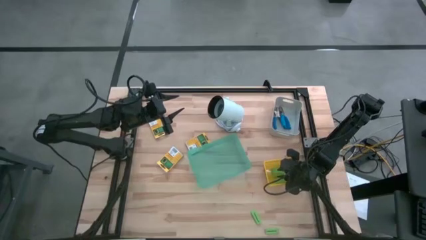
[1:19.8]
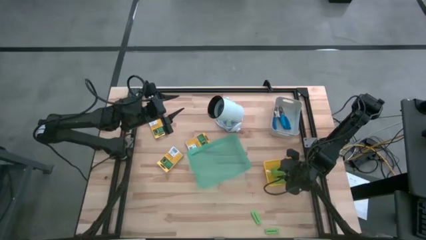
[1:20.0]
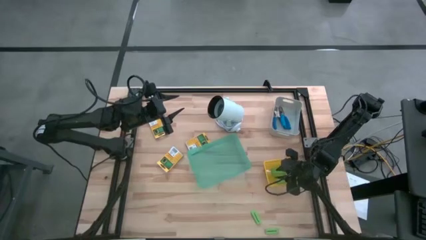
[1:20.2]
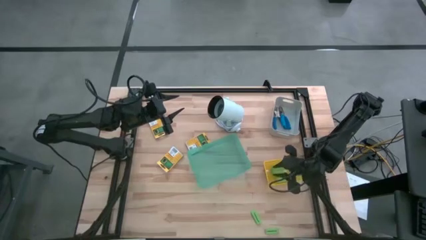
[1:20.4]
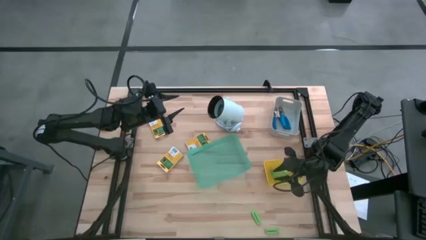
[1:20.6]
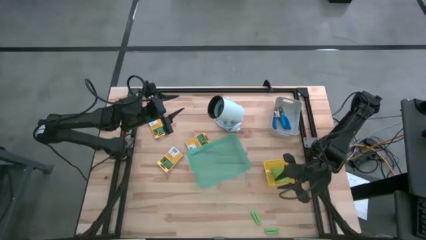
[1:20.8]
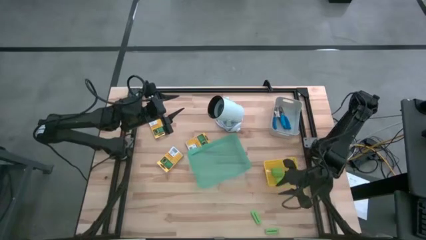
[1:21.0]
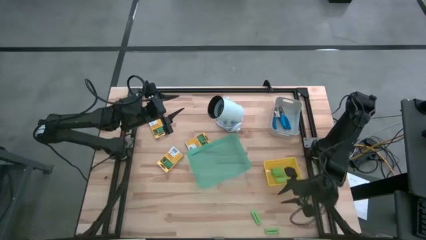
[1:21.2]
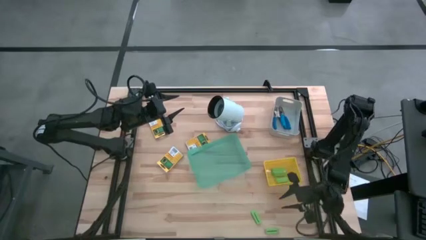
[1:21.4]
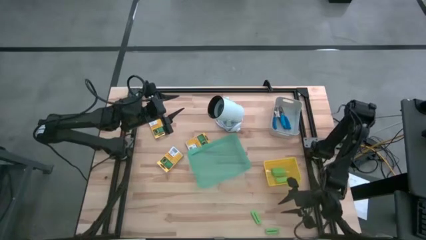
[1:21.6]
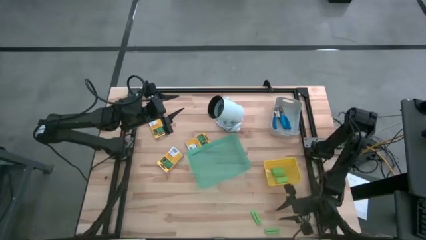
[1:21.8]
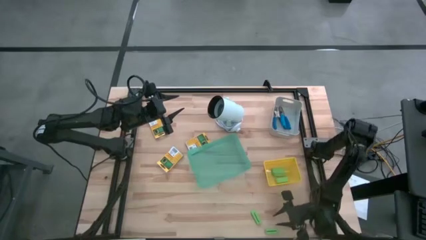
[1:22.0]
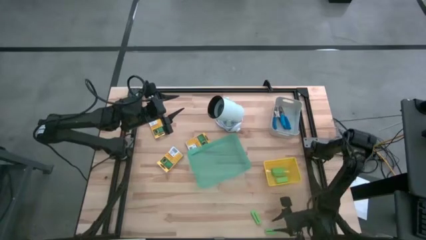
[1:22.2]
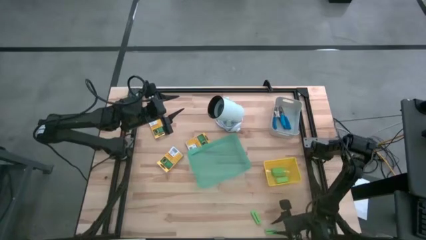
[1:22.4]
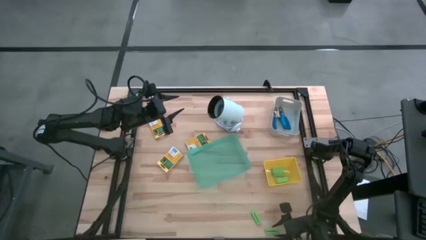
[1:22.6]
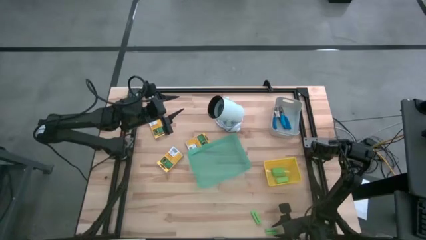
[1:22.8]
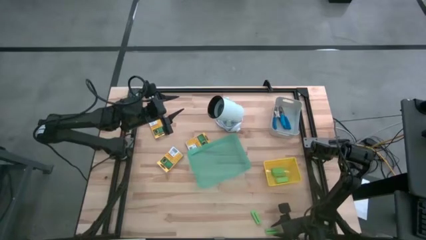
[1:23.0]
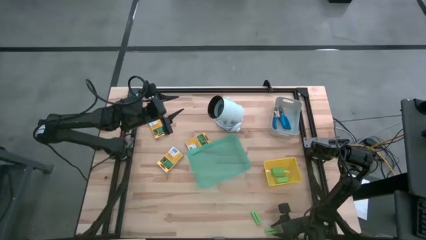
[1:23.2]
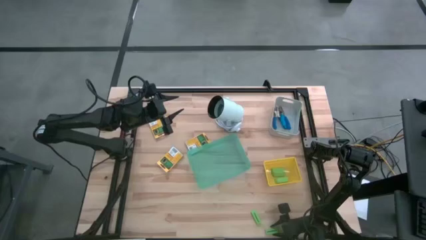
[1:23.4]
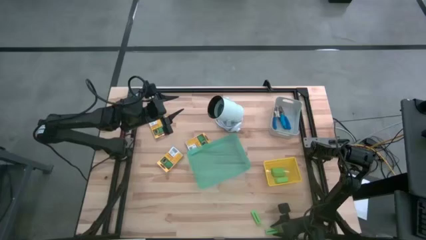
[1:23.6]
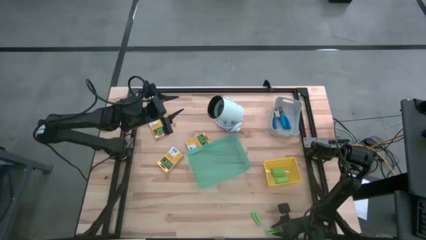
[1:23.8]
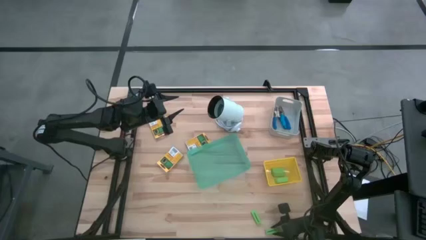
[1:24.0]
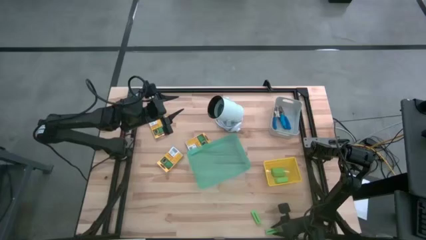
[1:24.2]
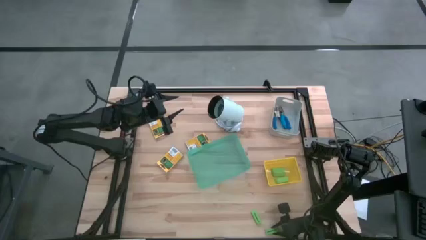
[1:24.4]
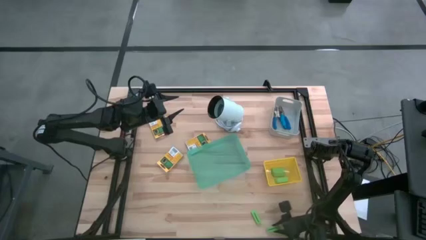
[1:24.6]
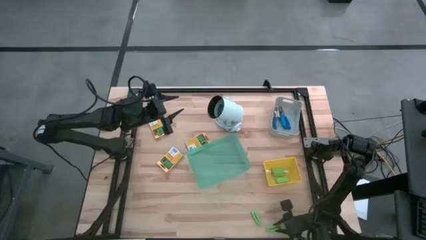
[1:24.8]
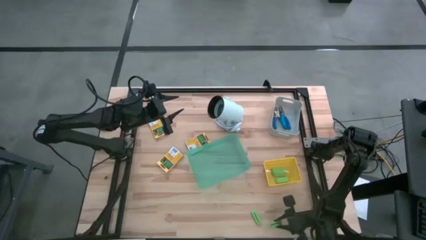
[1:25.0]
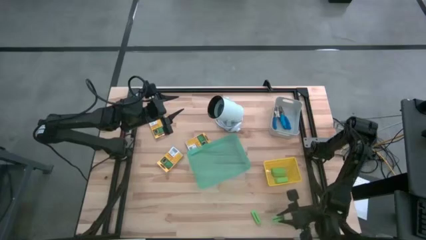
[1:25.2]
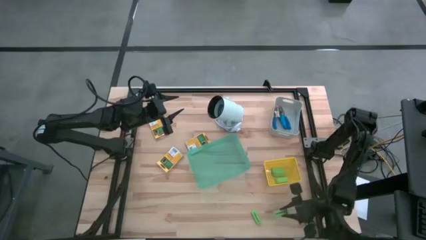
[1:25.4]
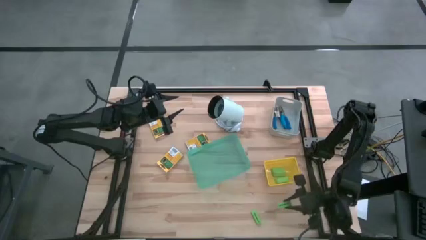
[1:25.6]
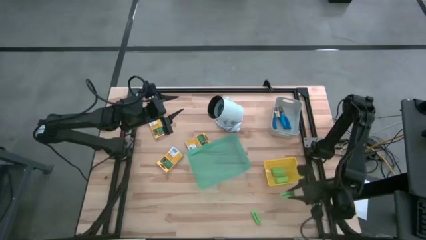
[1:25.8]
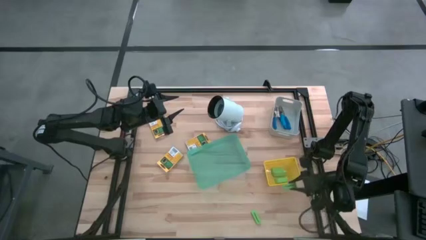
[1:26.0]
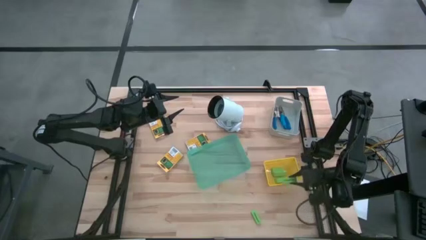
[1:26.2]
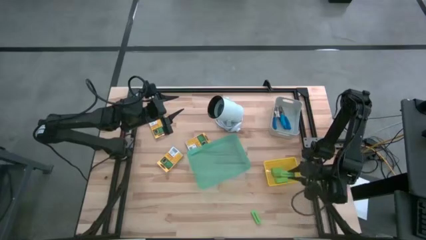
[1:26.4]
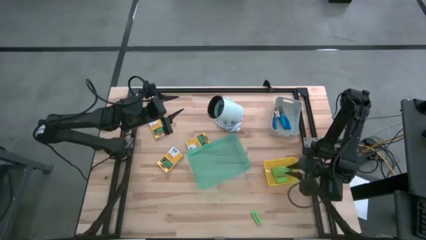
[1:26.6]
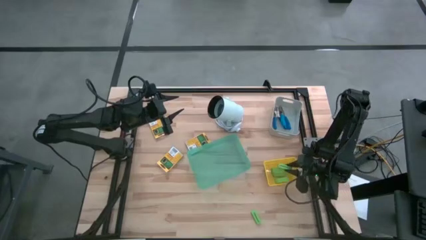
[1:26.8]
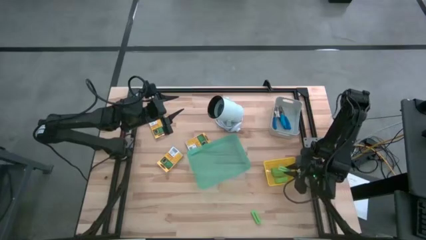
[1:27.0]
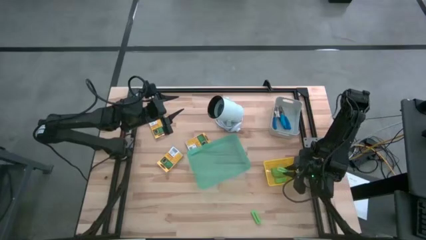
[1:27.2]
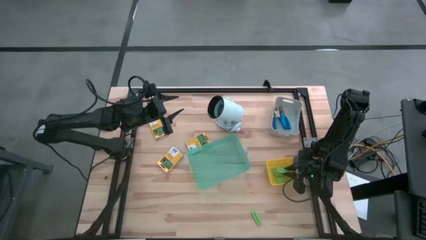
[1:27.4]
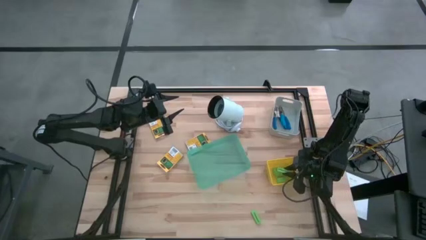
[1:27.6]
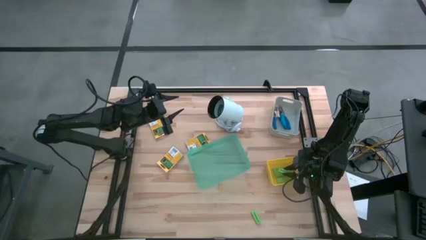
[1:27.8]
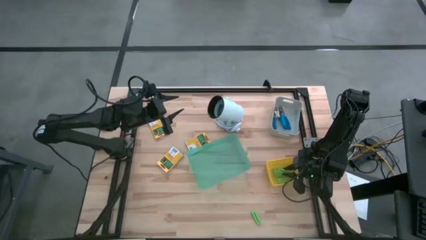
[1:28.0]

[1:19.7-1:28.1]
Task: Pick & Place School Supplies
Put the green eraser into the yellow bin

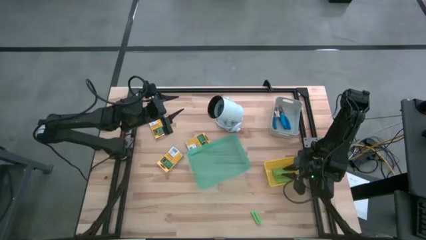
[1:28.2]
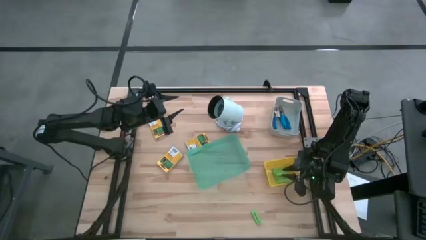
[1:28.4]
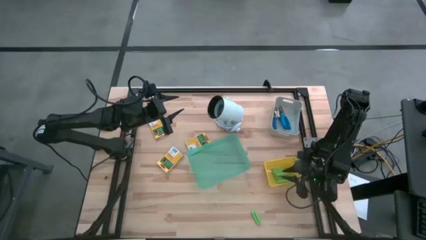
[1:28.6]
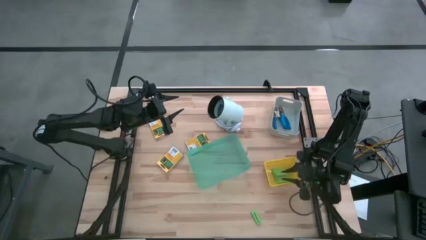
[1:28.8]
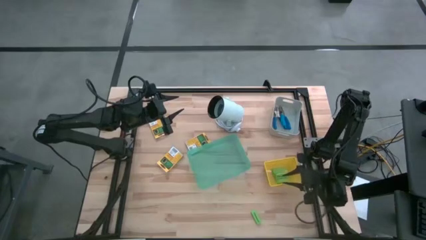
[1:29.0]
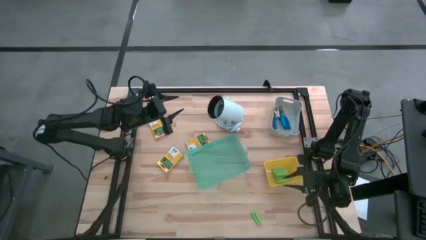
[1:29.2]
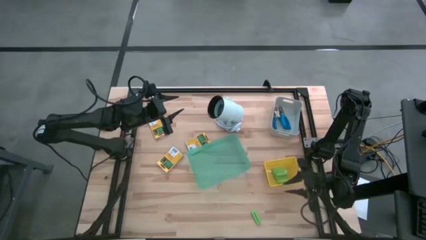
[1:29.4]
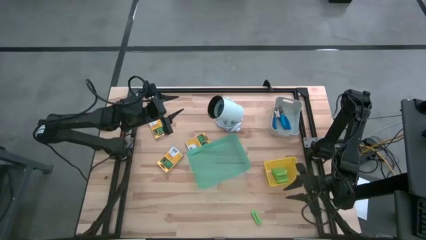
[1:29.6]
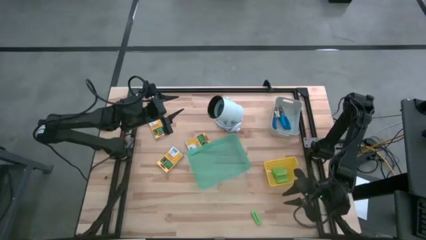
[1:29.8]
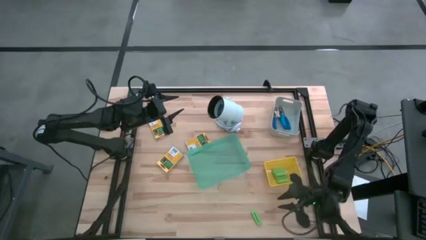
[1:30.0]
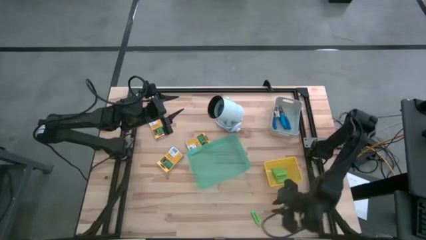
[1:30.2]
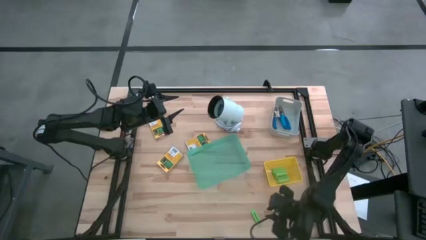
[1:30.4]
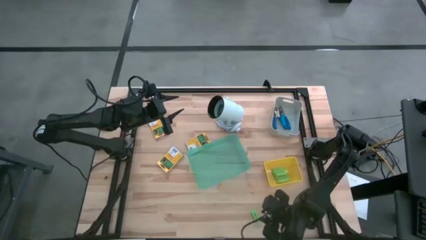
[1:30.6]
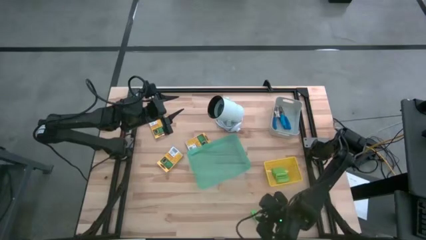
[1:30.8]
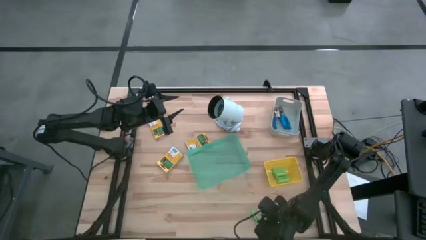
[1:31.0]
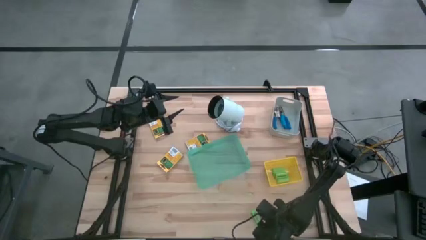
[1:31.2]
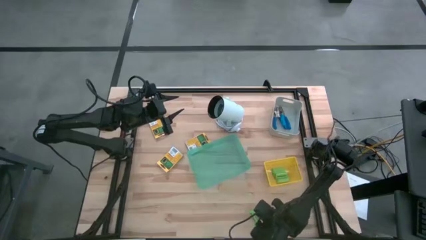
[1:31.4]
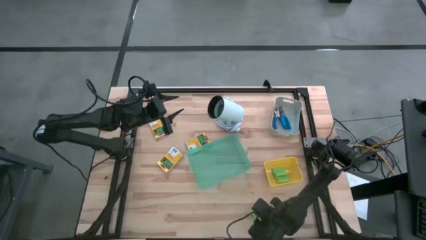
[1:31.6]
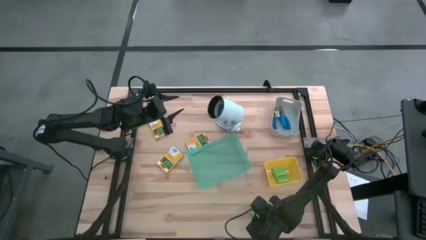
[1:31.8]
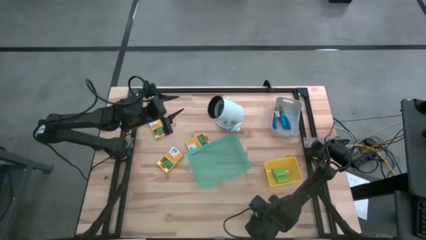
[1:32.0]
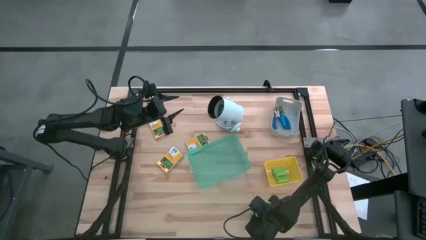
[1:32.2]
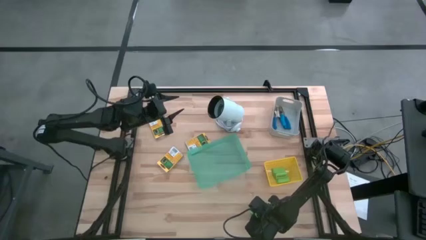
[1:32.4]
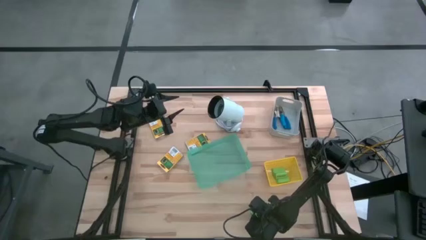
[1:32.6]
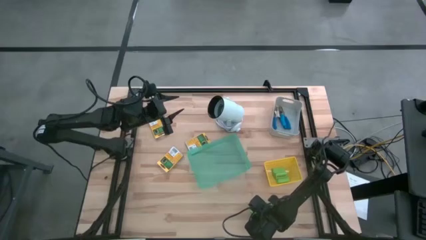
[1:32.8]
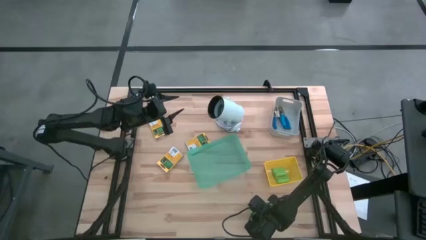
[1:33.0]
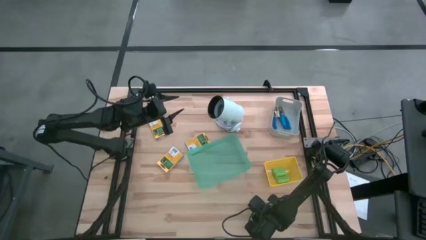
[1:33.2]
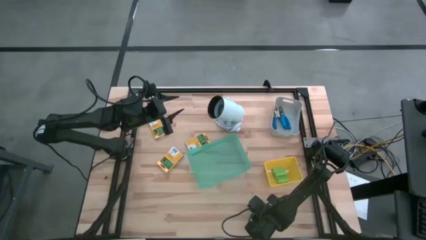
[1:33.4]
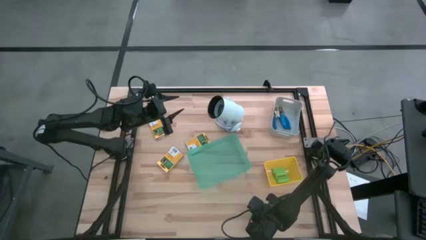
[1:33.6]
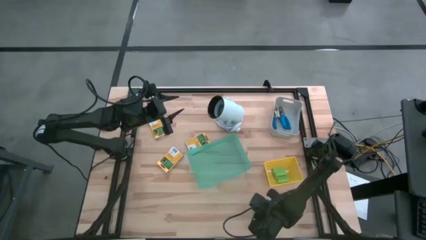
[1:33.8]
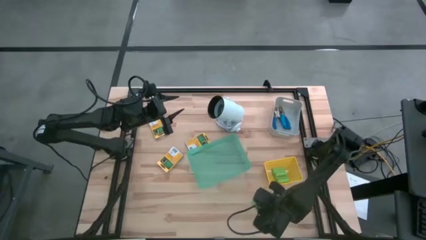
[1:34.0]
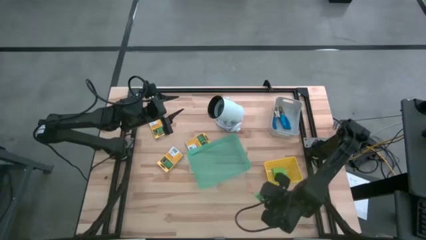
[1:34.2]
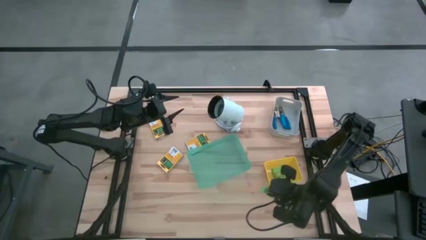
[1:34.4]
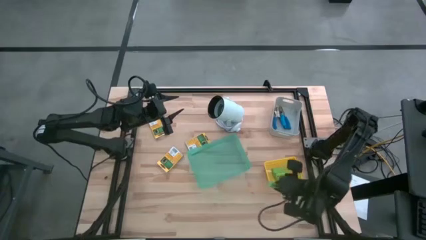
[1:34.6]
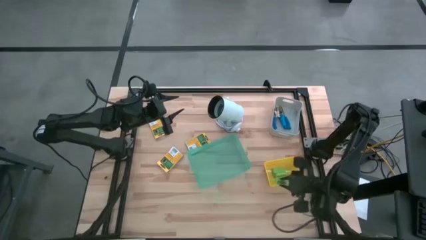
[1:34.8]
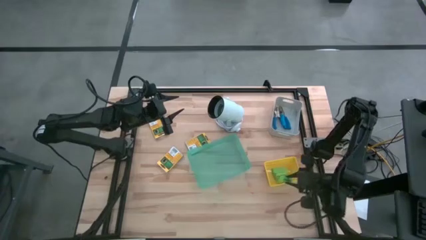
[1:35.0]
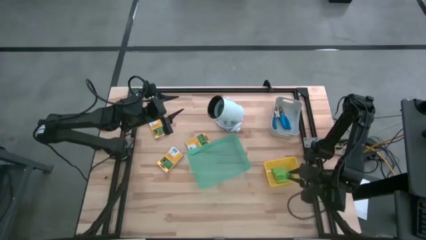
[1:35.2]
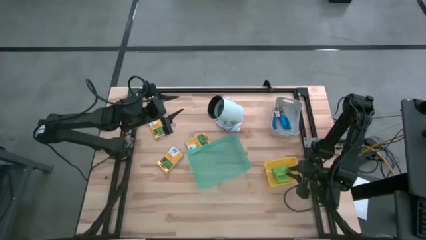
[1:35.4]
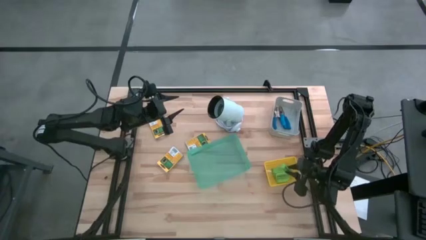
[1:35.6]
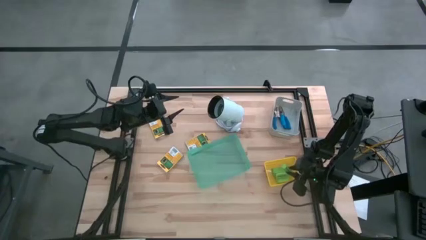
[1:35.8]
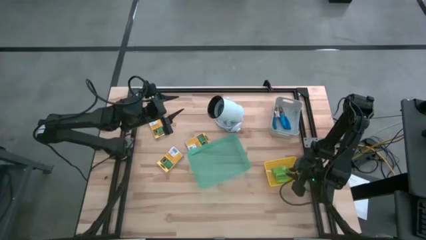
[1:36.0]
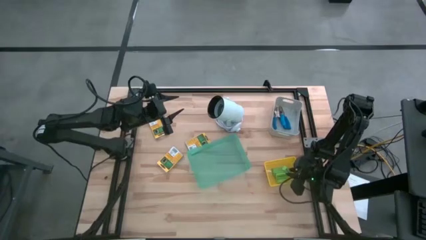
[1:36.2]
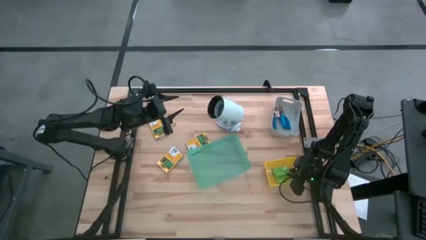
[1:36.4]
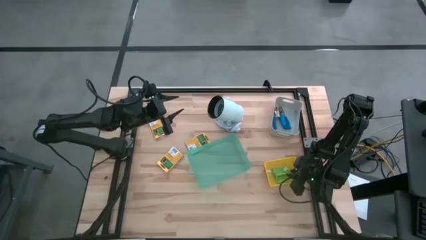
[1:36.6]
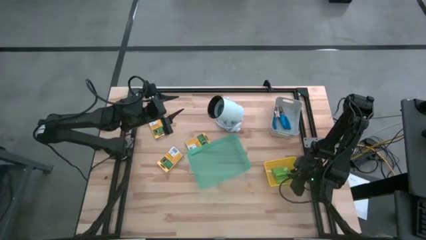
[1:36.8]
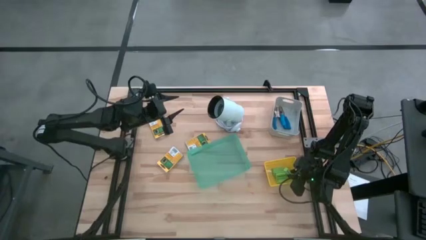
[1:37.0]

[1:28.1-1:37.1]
Put the green eraser into the yellow bin
